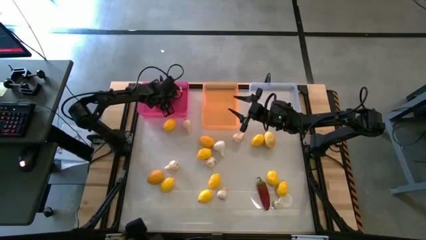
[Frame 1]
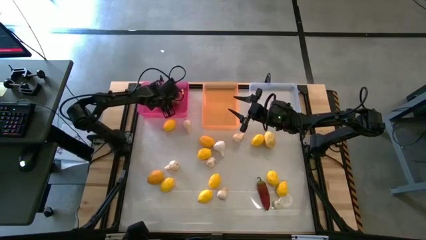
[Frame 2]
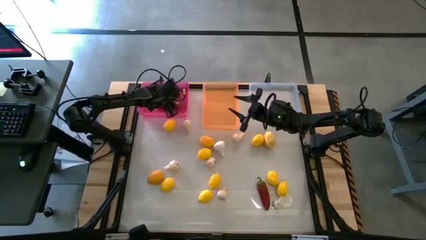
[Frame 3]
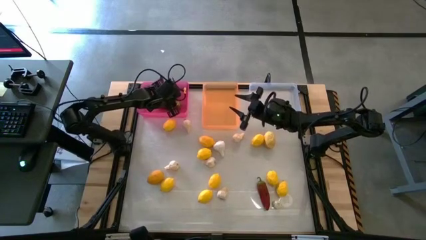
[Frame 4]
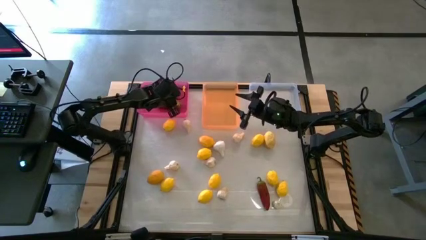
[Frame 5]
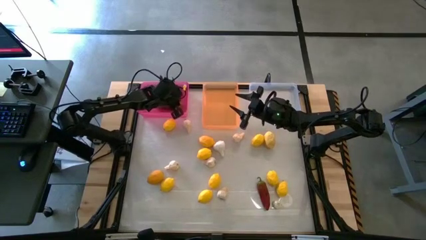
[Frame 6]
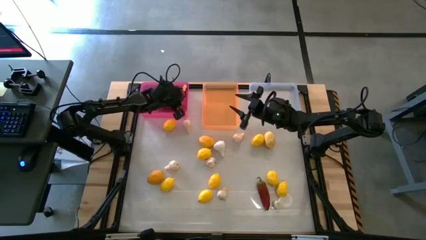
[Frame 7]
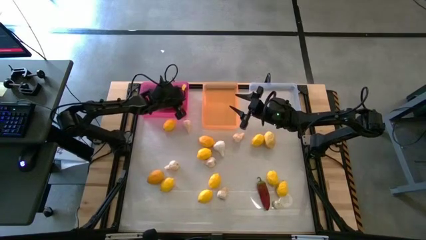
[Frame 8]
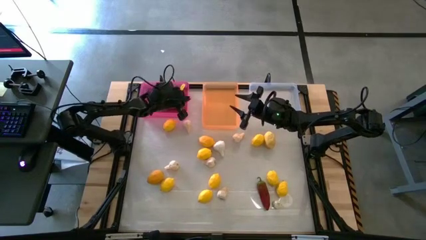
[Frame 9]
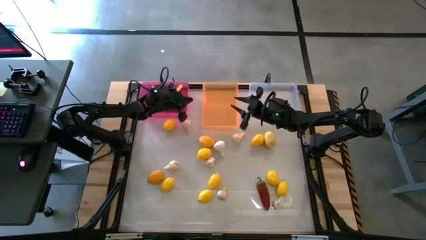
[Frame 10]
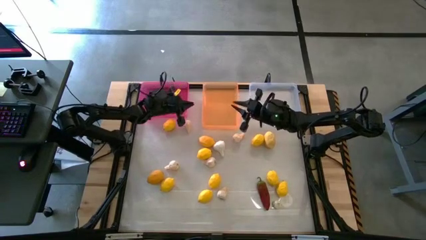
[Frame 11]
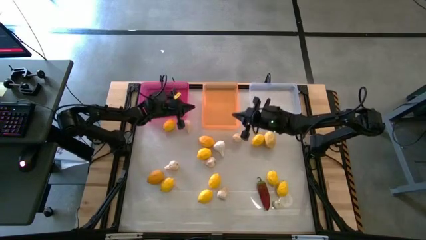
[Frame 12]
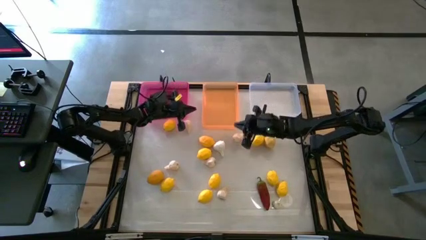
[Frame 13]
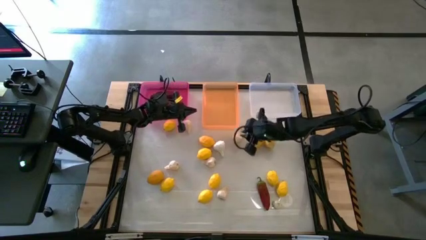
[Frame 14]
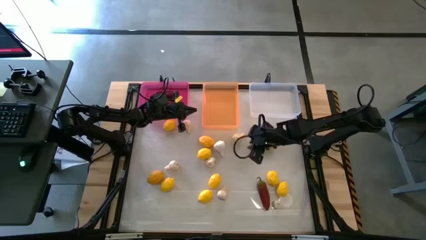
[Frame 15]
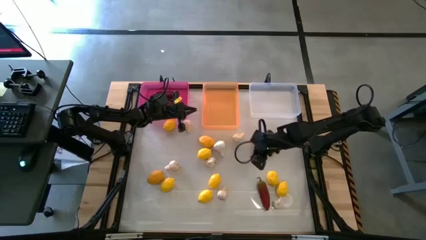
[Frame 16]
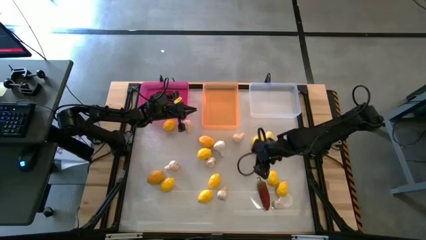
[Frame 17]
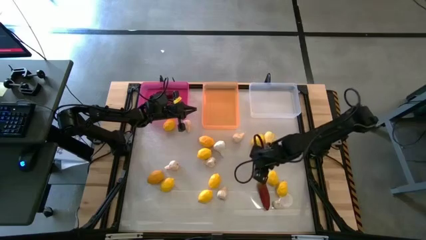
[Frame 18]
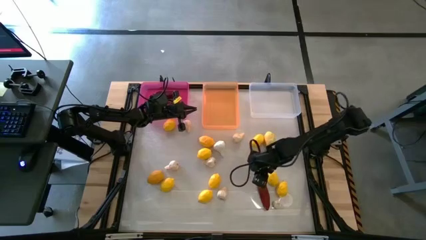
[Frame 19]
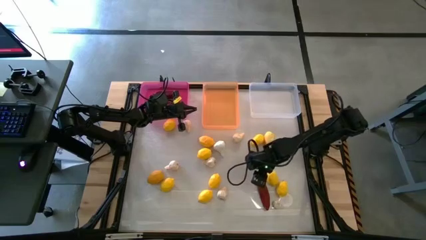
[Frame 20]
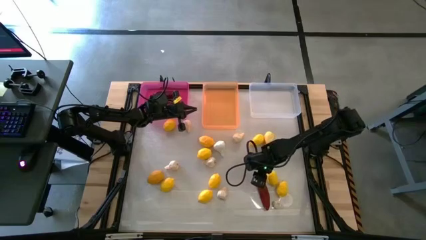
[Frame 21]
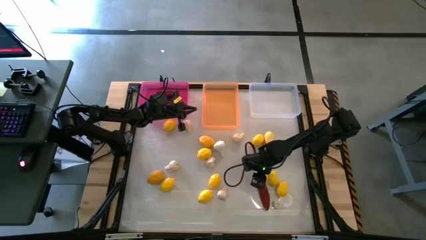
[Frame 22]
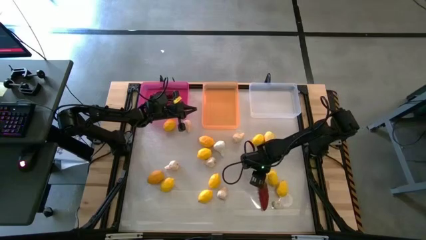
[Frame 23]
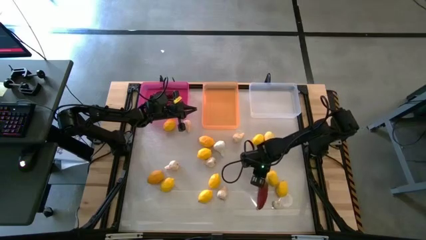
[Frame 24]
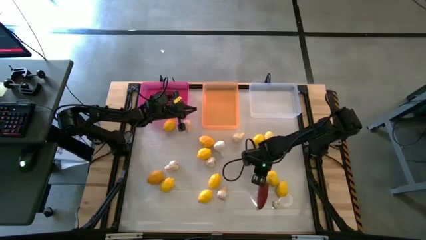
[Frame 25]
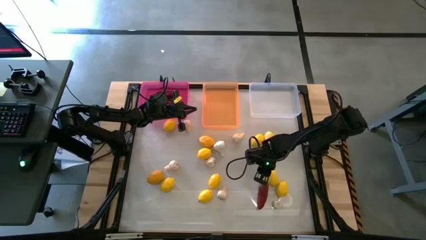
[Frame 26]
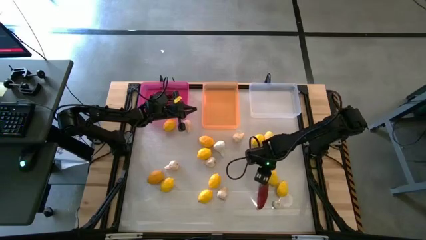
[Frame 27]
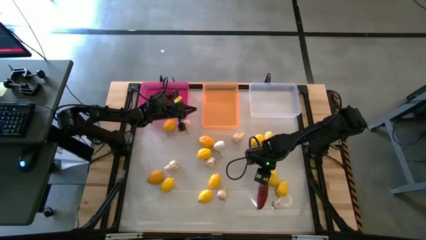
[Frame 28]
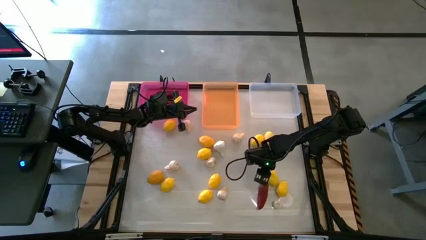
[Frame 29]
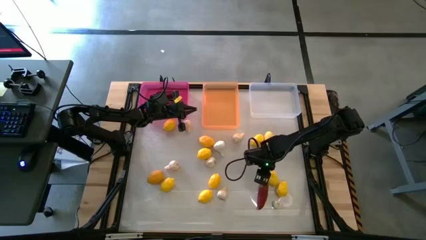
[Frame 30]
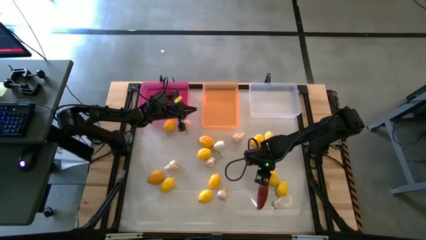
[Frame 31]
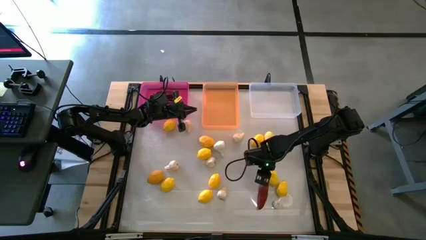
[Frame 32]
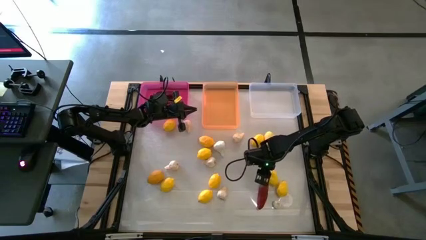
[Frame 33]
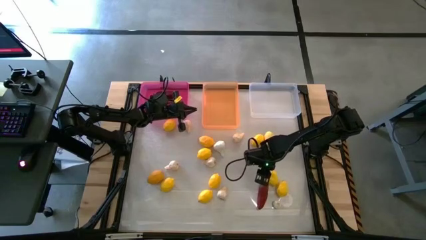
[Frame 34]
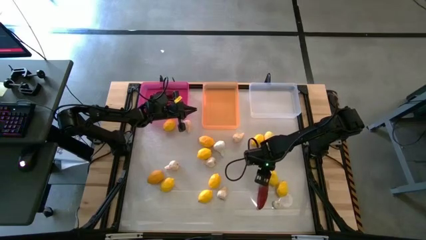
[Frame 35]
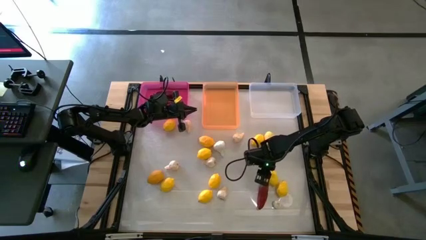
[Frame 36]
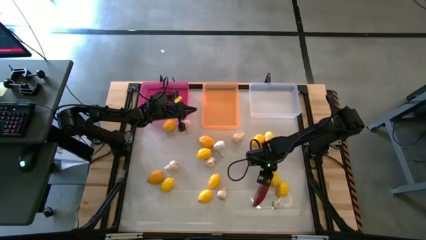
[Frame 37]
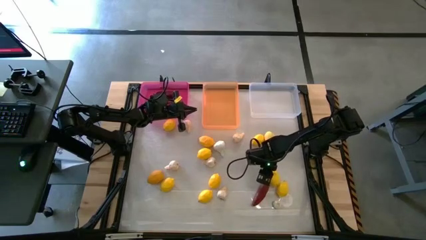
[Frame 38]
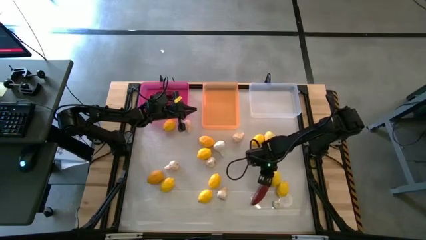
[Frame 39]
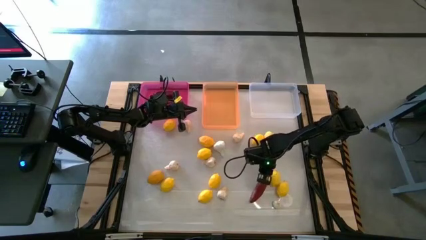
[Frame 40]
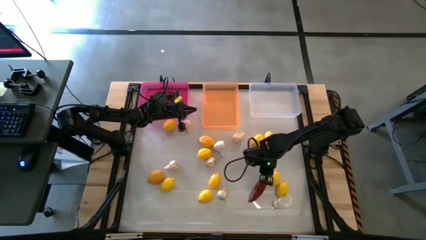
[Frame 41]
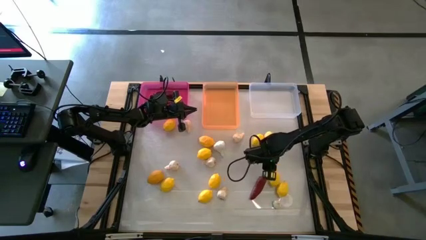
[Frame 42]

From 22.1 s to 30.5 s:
Task: Sort produce into baskets
Put the red chili pepper into the pink bin

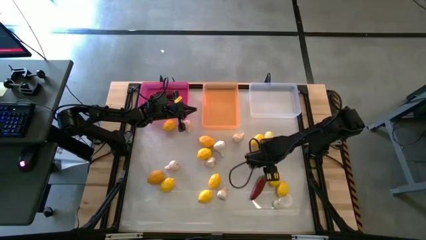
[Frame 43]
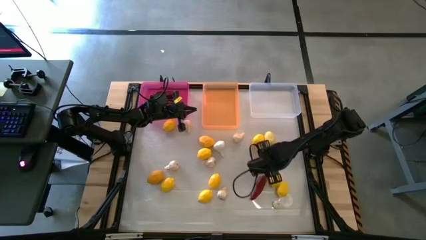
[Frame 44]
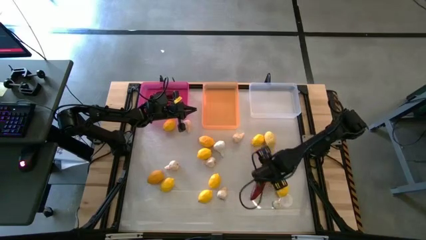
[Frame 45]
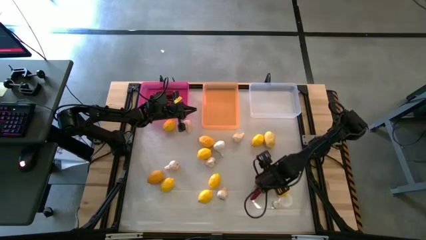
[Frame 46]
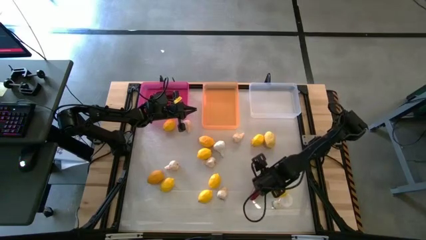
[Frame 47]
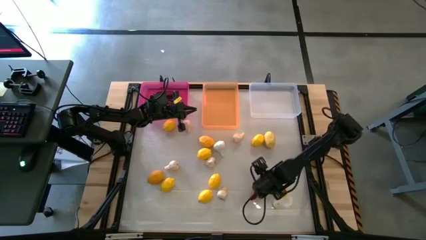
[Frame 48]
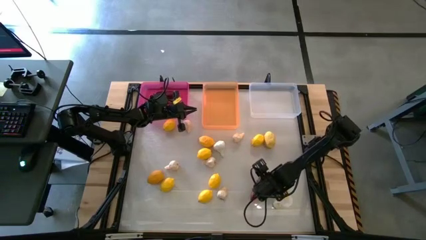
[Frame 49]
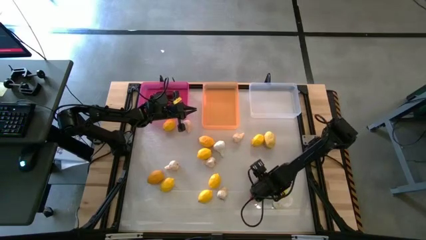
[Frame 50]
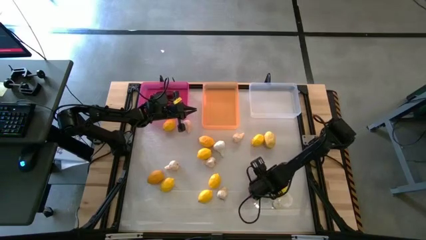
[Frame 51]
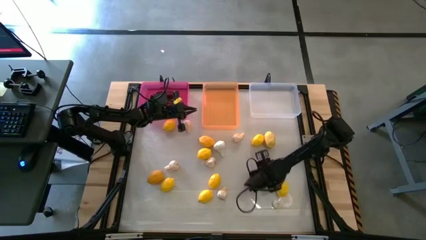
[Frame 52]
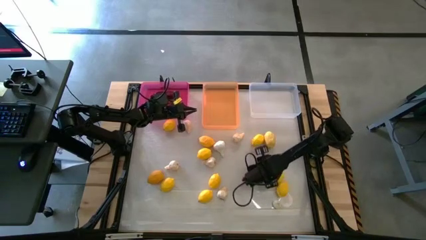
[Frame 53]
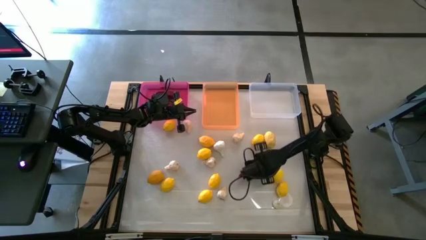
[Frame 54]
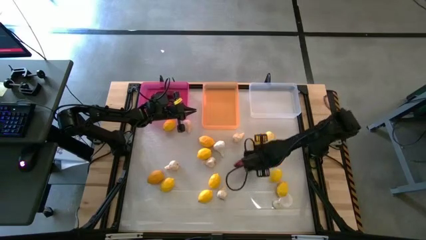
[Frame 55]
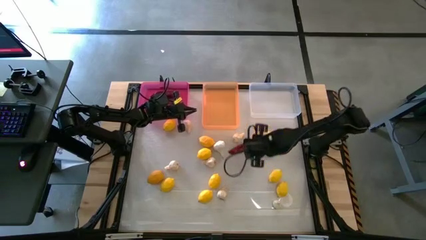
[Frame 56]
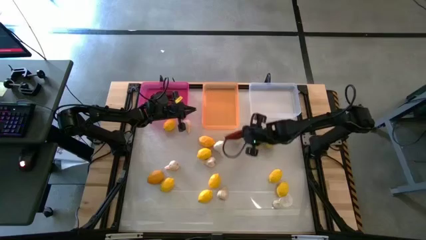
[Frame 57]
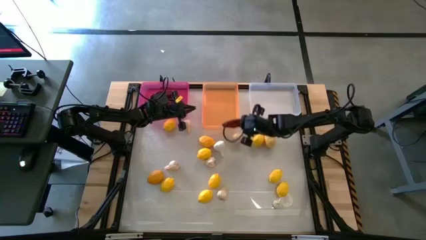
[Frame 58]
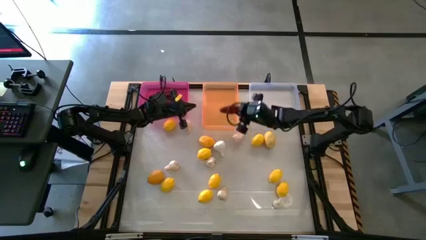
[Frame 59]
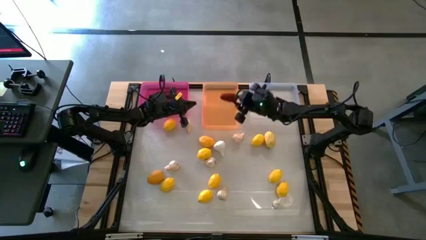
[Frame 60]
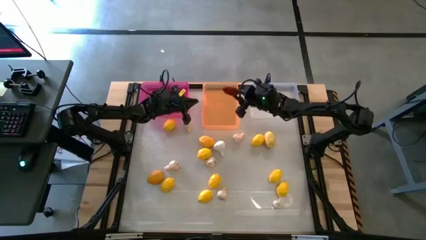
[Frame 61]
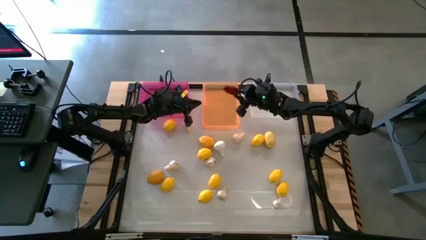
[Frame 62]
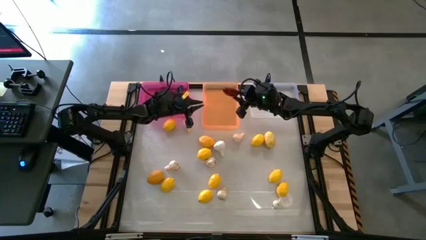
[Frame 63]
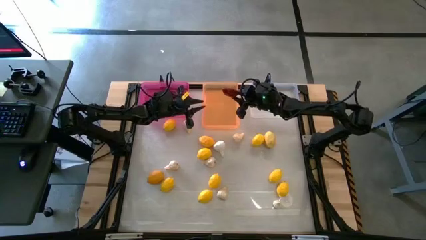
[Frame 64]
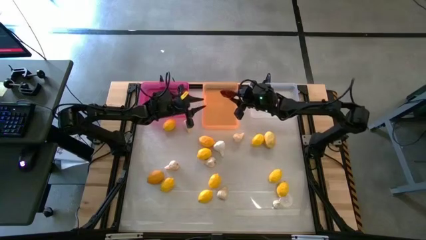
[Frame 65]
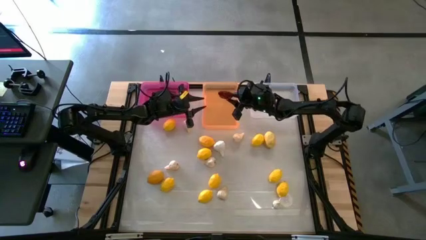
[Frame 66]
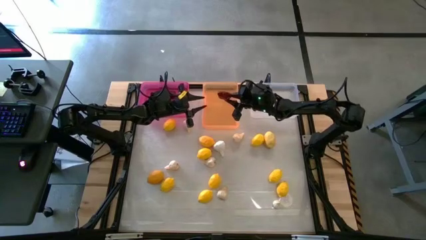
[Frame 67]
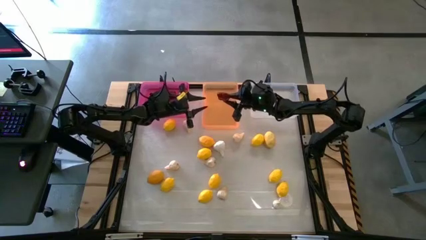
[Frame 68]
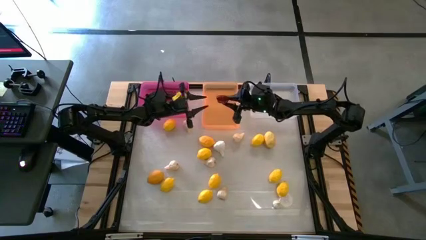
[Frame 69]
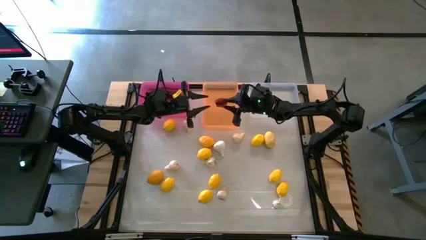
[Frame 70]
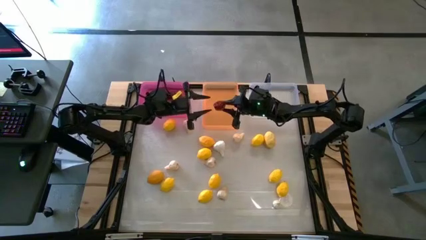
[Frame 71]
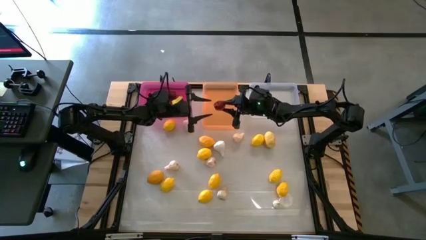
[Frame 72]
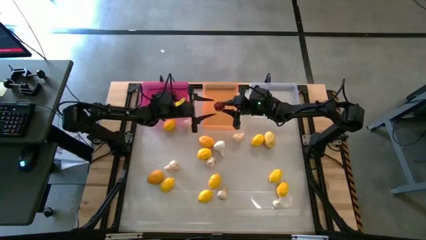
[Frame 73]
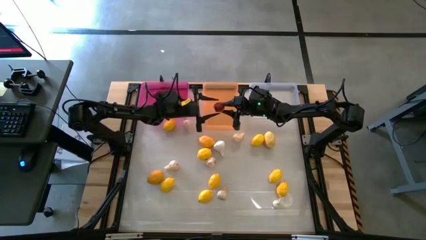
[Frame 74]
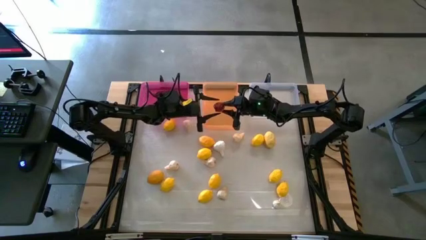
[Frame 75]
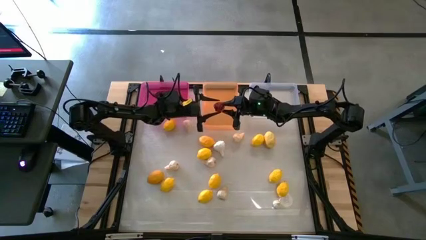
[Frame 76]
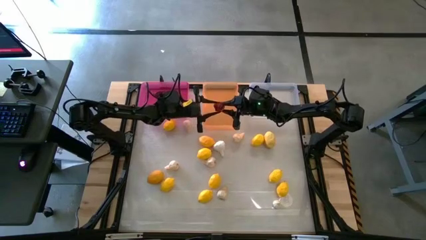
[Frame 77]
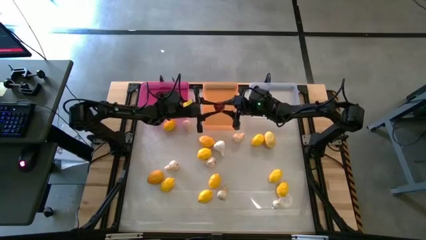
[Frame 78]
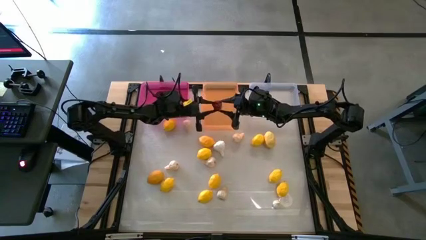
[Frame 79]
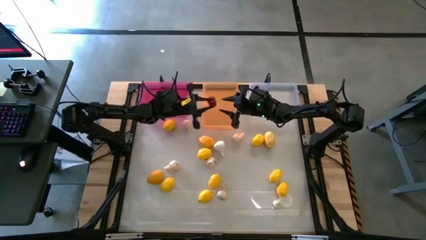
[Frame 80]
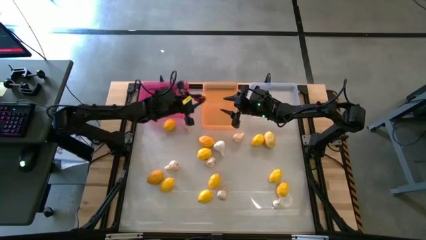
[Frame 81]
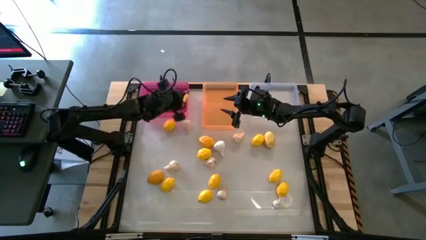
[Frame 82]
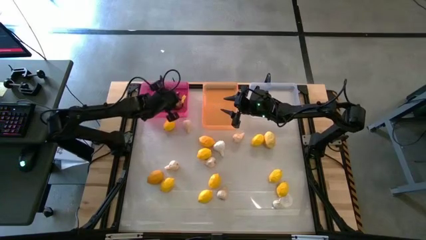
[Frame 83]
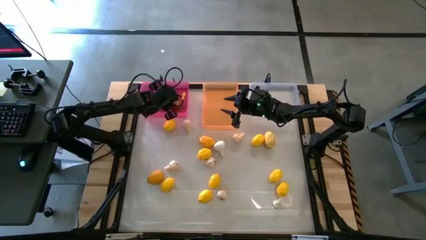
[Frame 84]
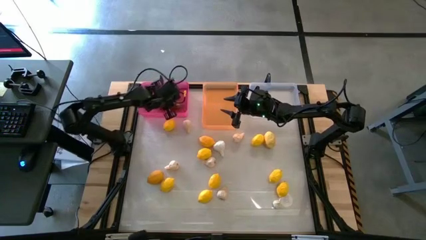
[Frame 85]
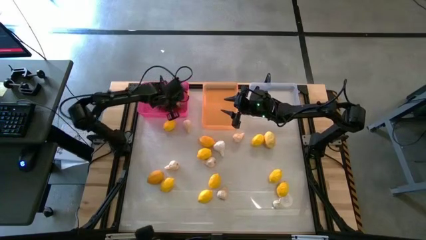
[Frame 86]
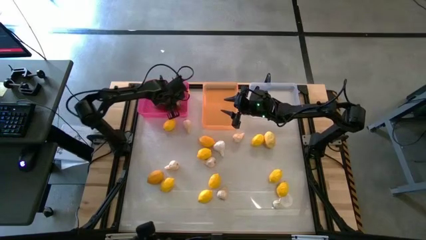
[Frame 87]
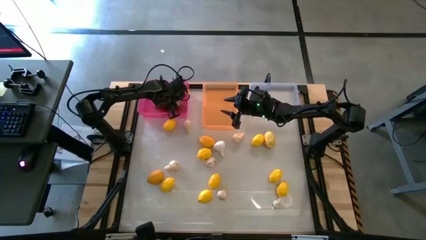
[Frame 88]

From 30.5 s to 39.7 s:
Put the red chilli pepper into the pink bin
